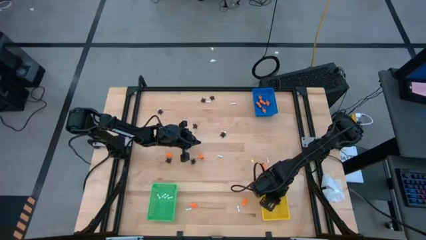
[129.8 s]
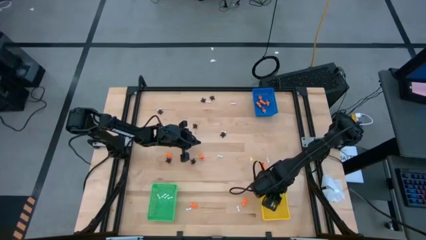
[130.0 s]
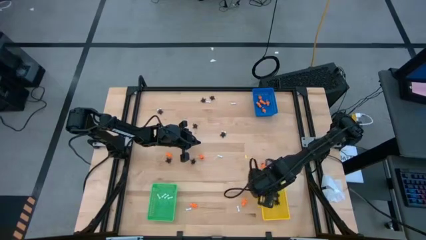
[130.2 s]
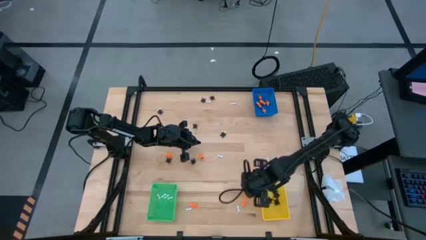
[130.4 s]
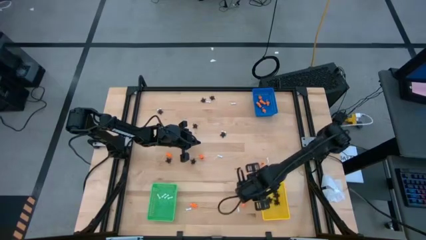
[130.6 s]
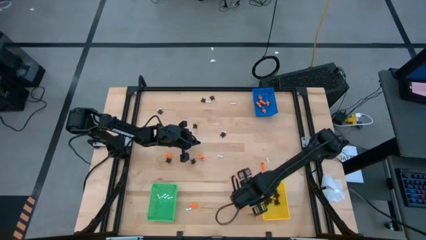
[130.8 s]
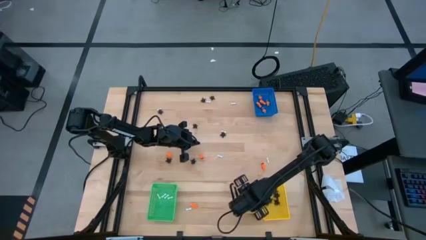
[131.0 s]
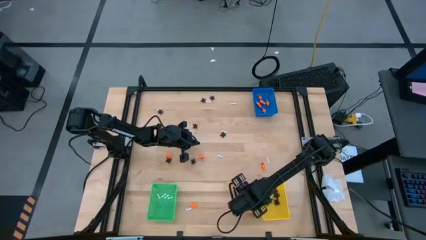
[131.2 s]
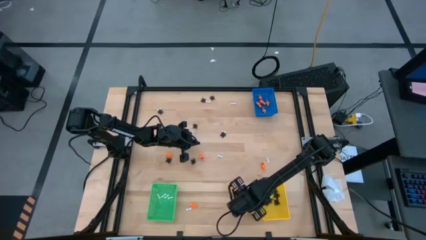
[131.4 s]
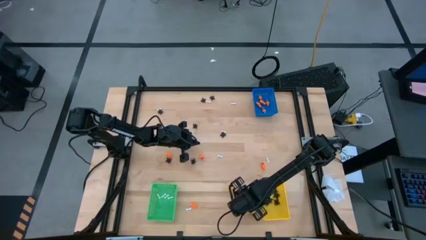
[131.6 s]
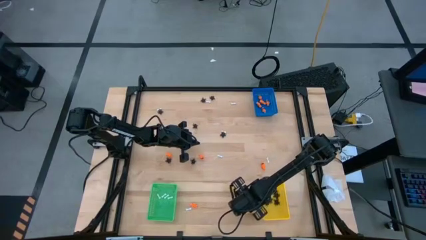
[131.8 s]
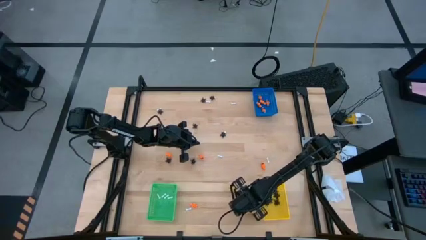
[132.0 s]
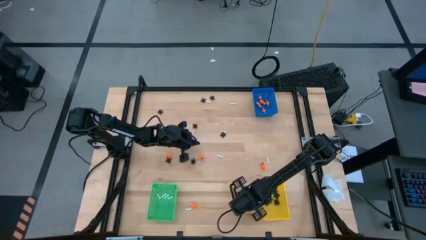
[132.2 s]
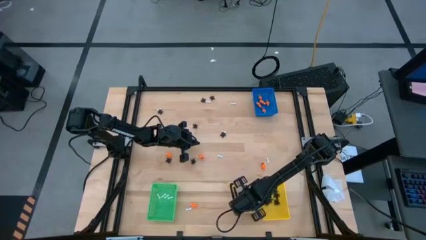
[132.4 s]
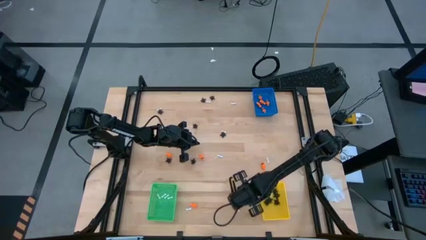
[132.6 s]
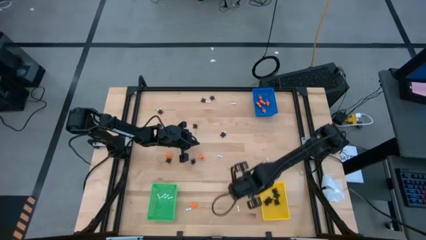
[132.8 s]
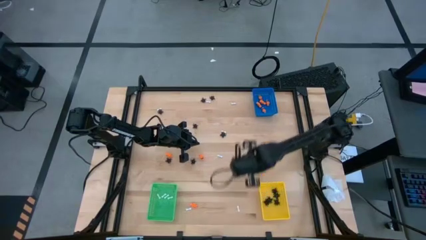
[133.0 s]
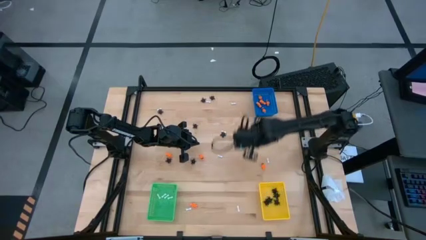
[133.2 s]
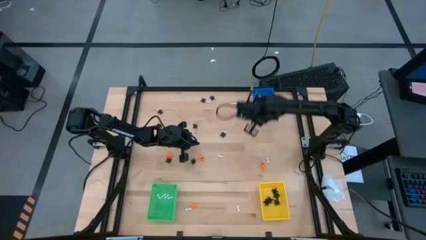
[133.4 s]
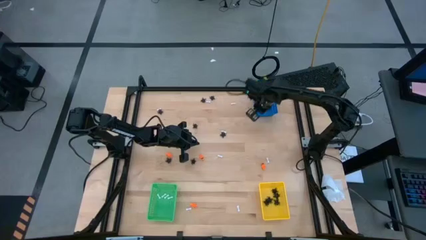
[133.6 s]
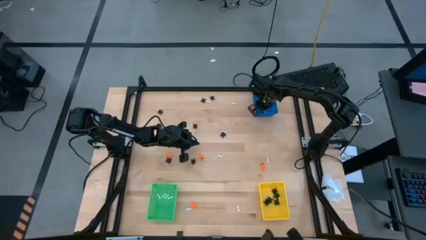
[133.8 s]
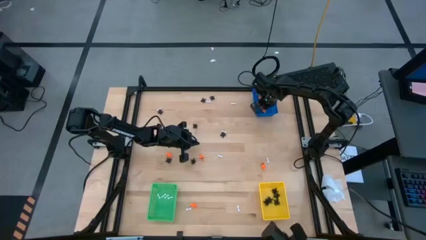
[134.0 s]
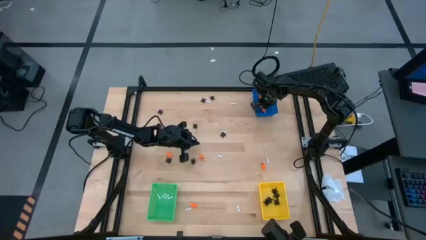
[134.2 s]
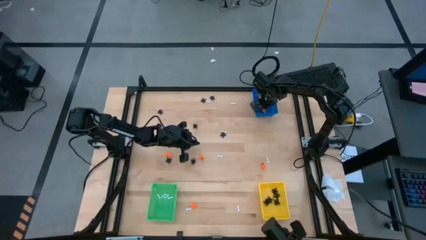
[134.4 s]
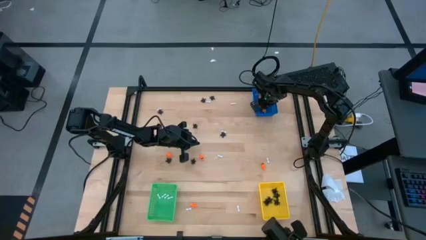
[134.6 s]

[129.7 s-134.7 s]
Task: Sort Halloween decoration
Put the orange toy skeleton into the blue bin

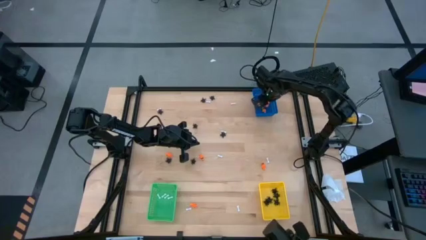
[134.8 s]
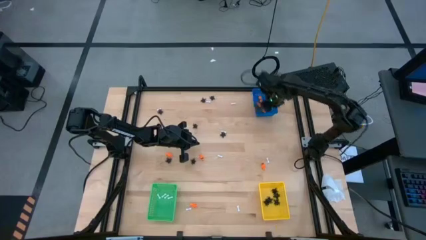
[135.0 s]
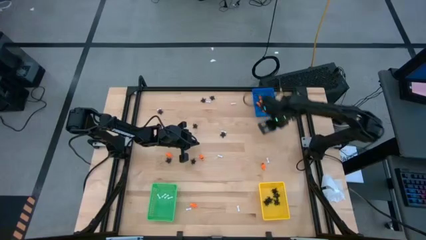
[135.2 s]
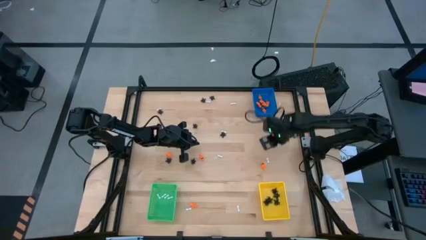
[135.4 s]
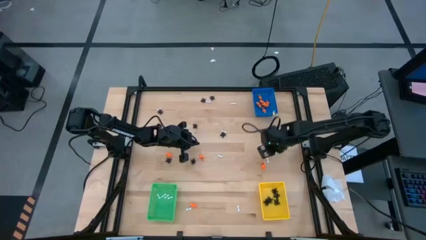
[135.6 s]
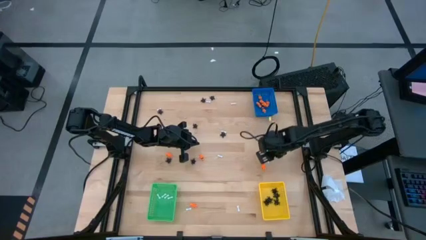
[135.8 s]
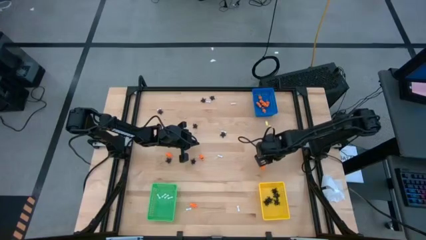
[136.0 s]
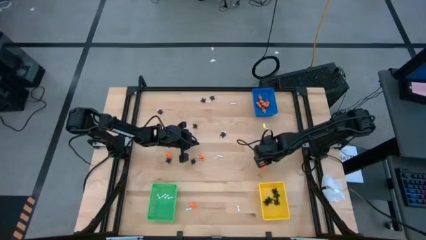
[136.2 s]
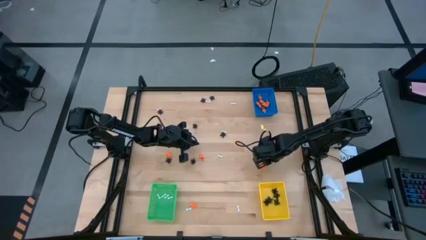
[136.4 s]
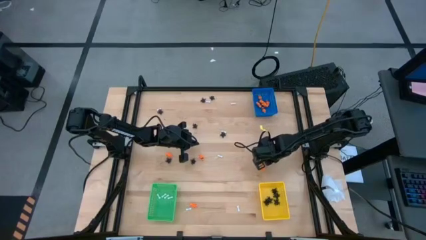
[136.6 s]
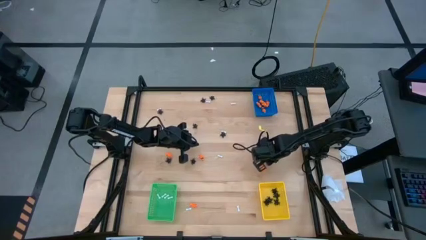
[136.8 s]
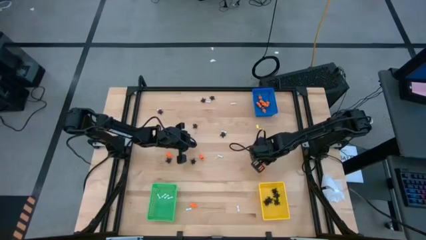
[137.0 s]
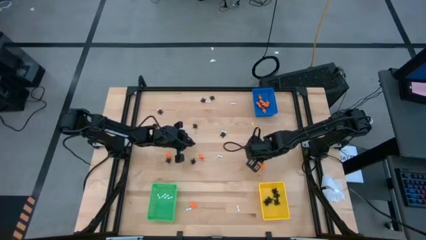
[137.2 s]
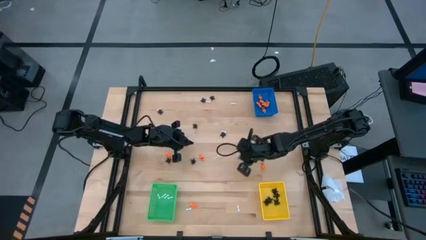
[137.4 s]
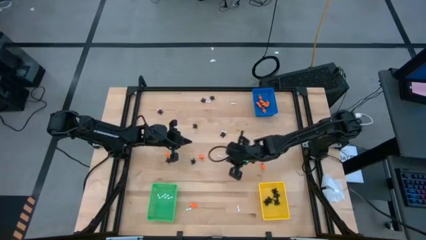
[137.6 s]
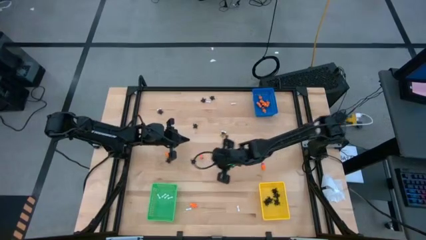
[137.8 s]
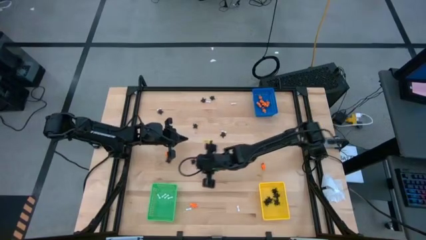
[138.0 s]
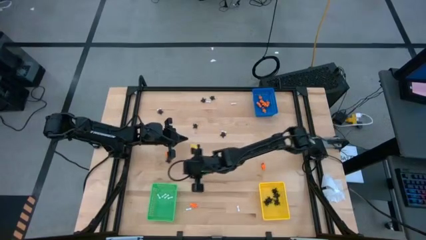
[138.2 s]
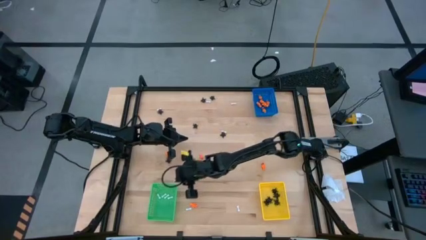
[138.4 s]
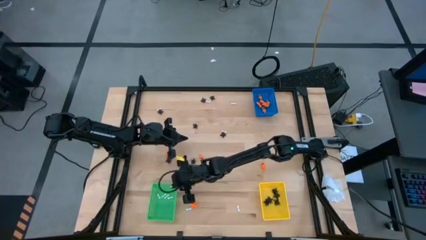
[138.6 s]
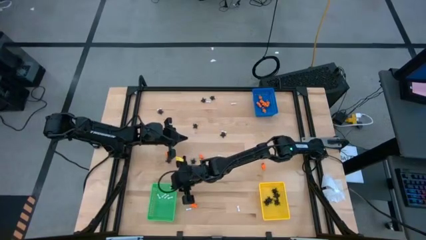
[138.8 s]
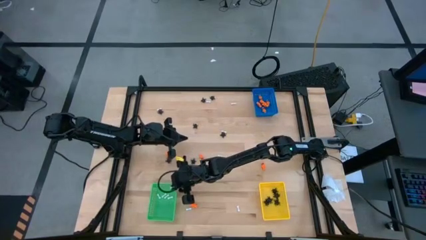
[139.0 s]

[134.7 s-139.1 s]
Put the white bone toy into the green bin

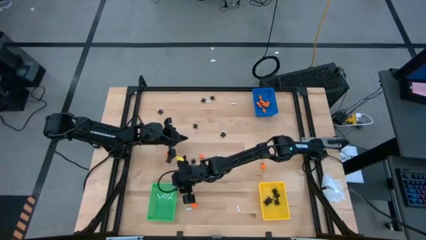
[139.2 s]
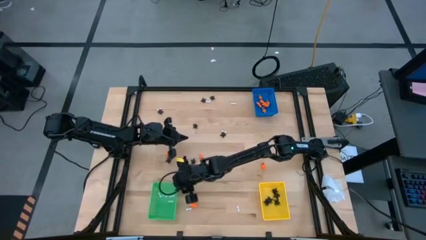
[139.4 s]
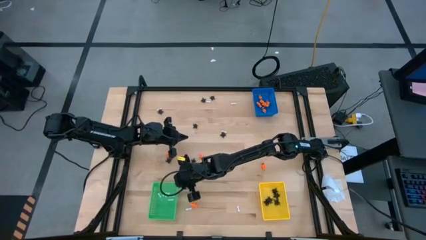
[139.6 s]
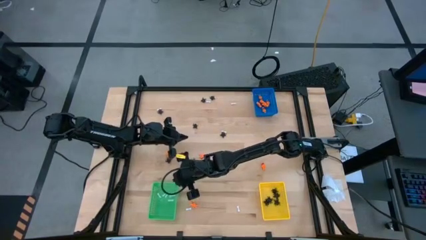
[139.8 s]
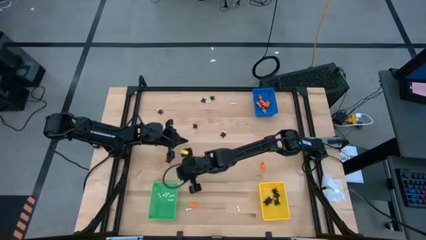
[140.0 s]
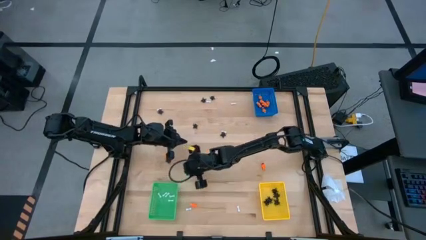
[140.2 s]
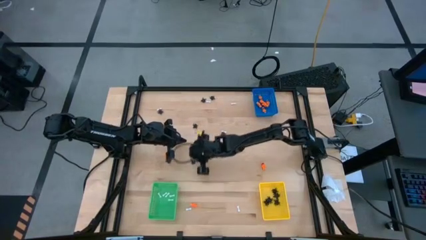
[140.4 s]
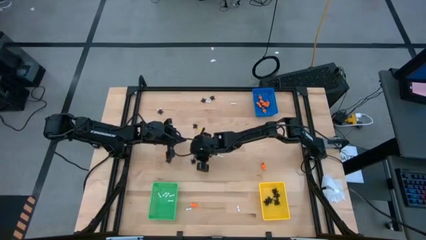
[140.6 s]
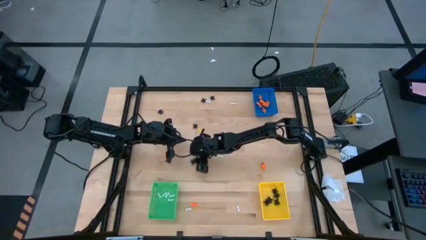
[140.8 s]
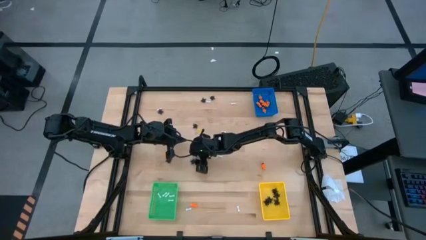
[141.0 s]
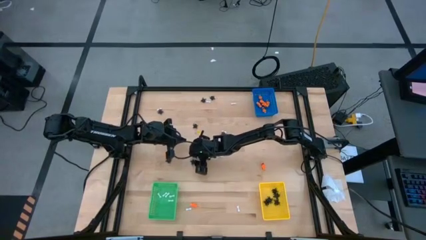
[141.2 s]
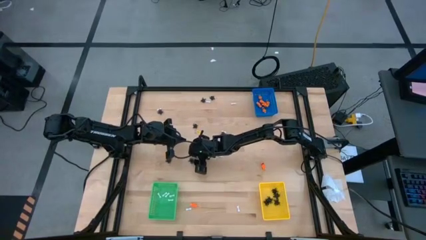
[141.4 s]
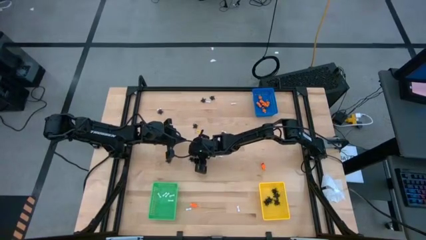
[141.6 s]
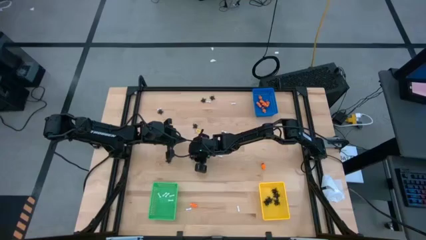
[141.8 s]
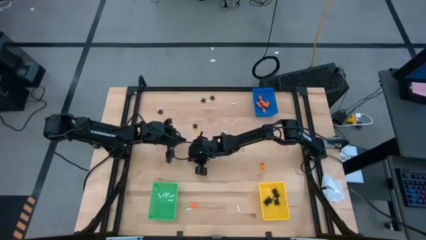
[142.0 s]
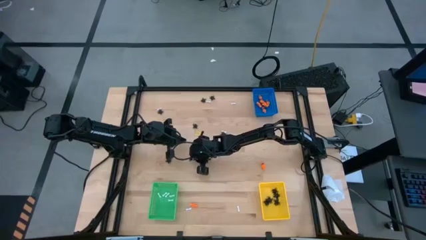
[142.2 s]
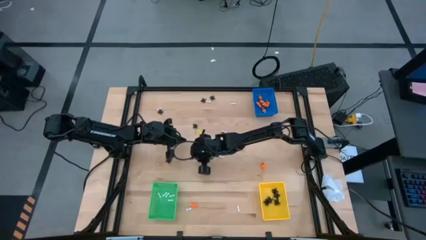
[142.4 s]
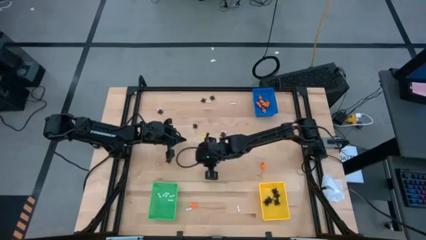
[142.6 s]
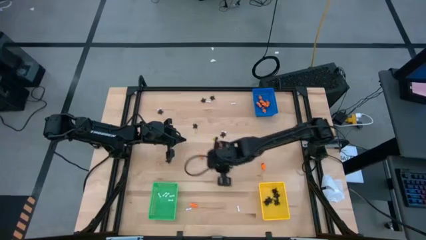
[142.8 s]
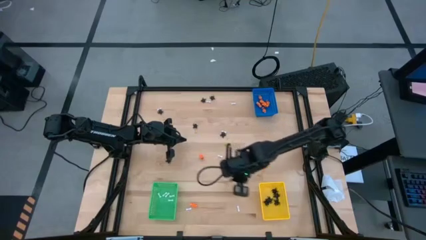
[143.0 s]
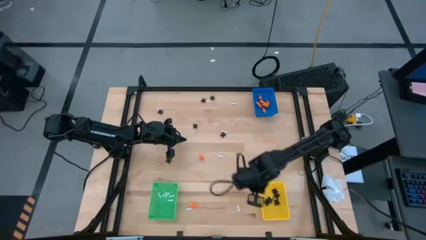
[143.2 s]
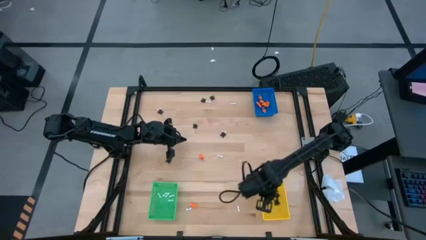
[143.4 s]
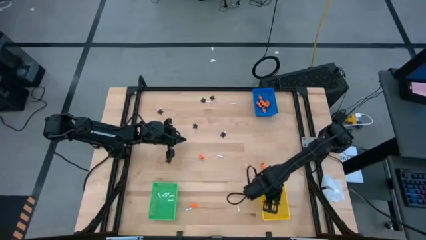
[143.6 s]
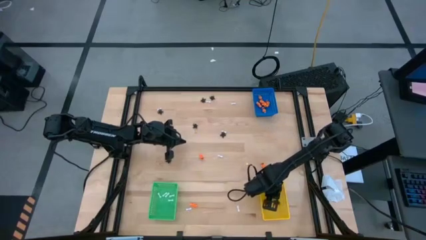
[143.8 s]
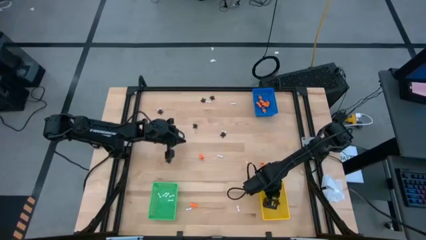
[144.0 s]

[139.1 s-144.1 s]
Put the black spider toy into the yellow bin

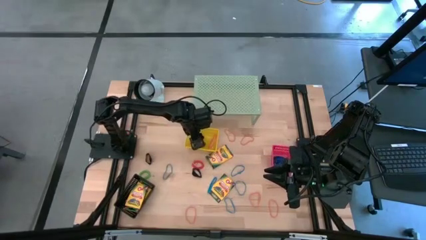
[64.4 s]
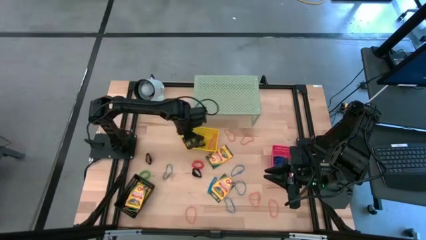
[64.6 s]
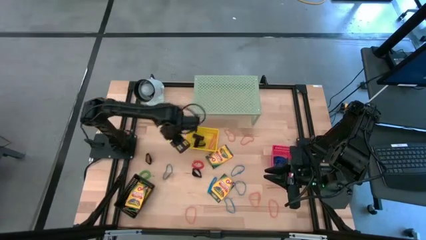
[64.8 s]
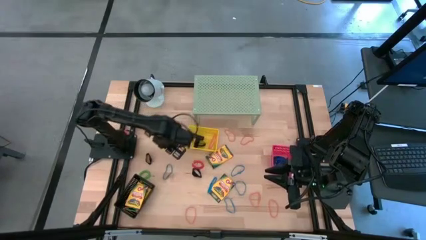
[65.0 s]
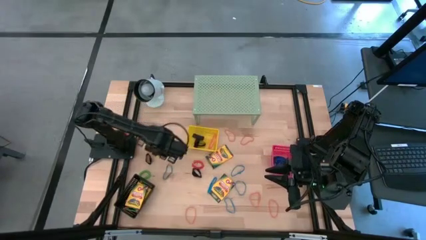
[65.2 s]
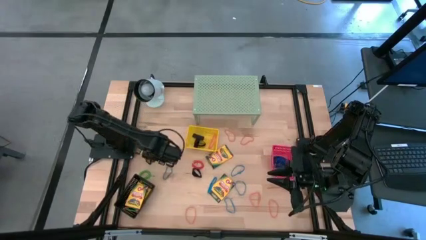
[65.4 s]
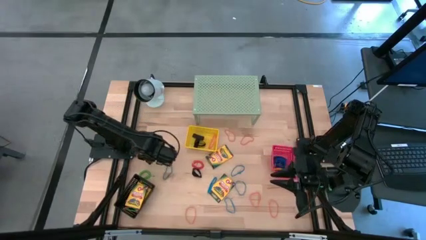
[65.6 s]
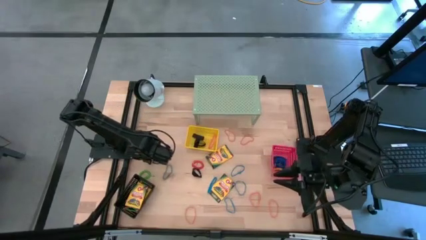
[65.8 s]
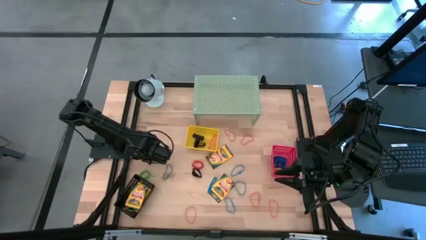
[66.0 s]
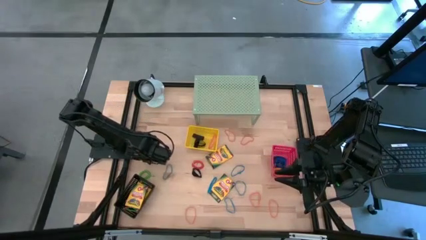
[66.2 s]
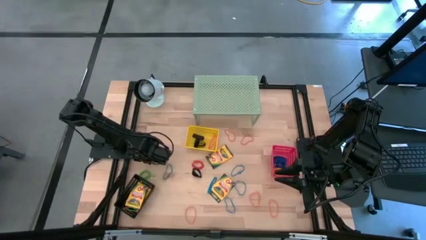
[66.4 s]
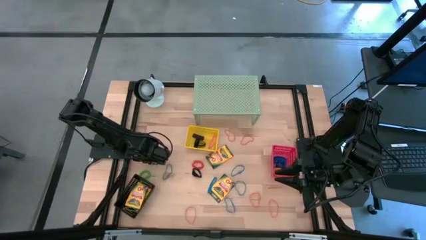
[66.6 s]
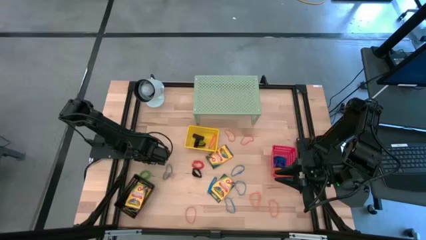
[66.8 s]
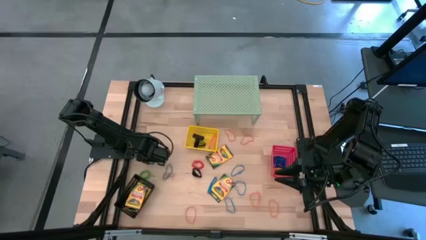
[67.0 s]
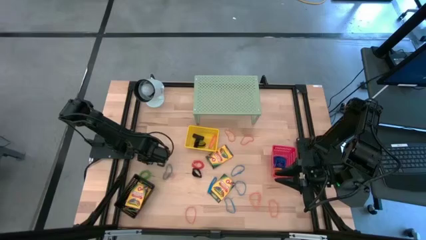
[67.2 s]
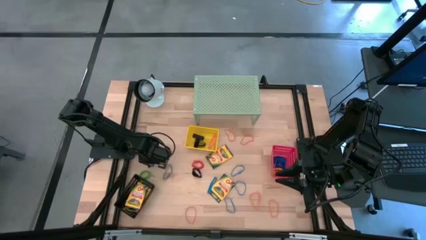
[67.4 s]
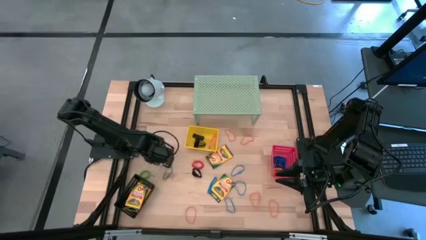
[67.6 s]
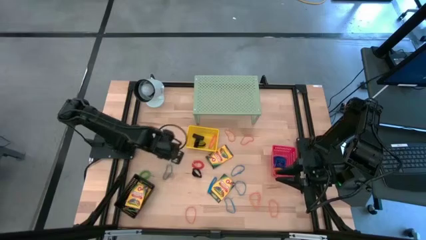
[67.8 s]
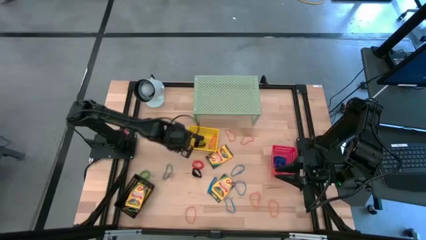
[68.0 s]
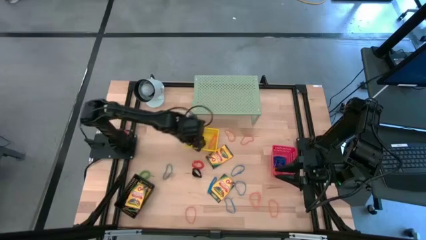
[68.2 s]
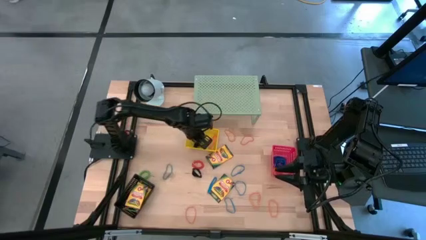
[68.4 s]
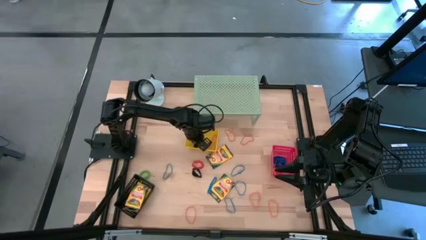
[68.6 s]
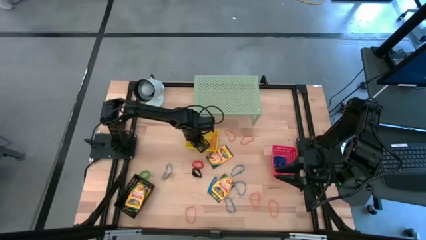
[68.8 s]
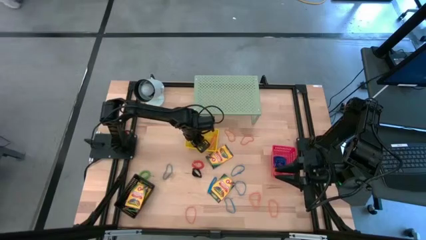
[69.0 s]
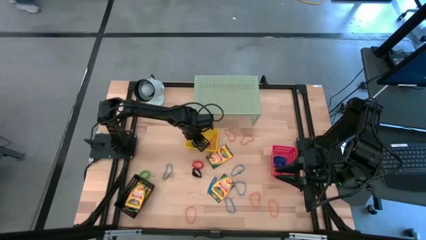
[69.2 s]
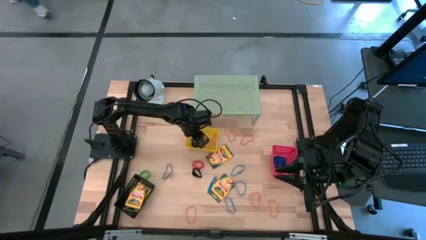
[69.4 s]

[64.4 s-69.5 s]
Task: Pick & Place Office Desk Supplies
Put the black rubber band into the yellow bin
